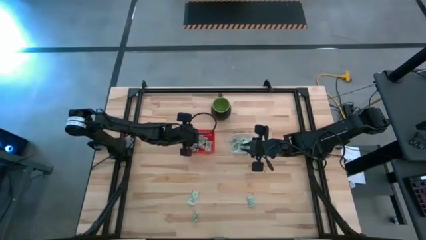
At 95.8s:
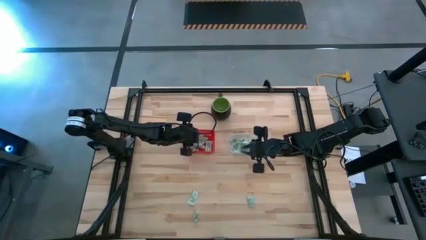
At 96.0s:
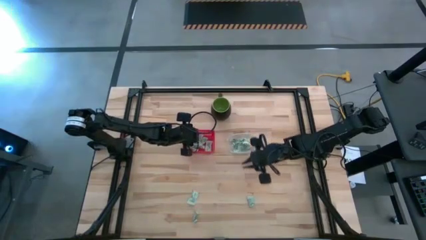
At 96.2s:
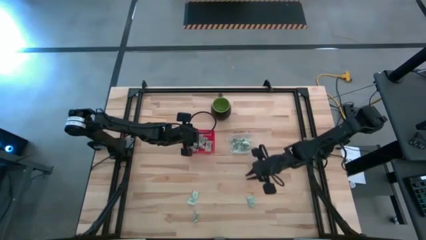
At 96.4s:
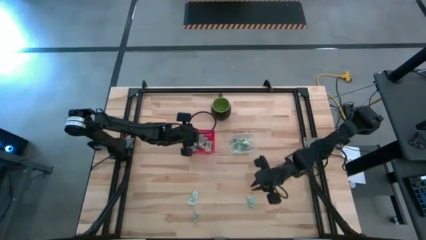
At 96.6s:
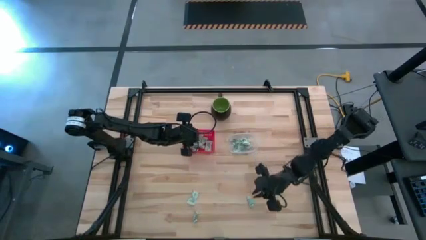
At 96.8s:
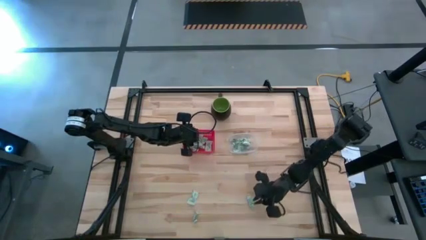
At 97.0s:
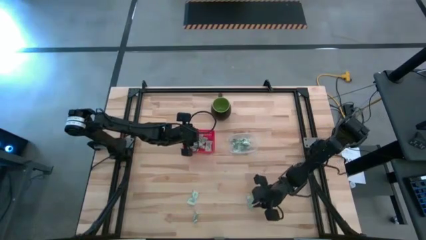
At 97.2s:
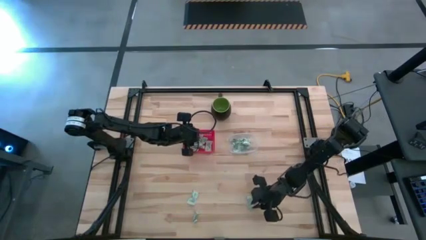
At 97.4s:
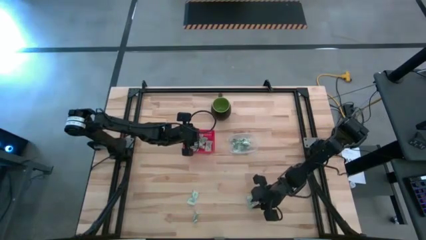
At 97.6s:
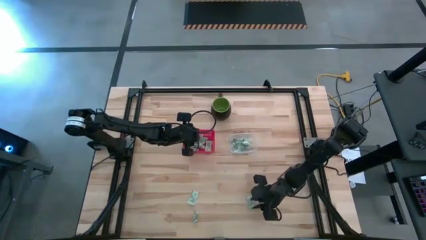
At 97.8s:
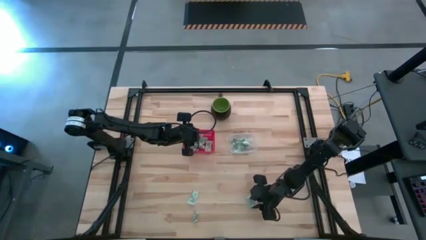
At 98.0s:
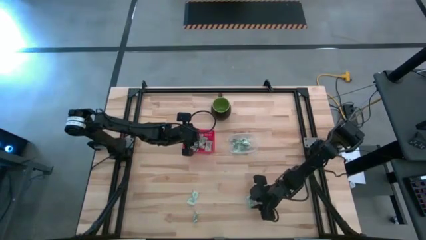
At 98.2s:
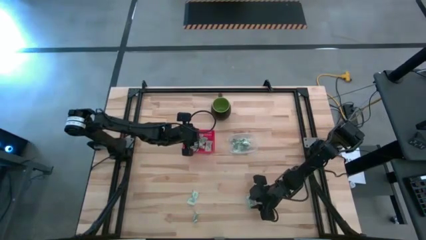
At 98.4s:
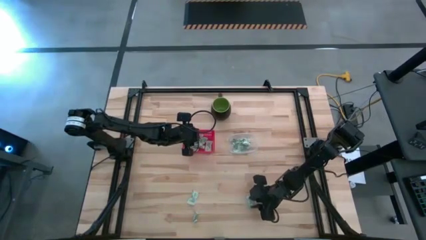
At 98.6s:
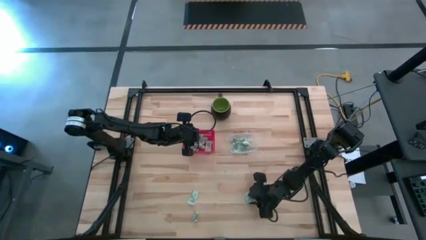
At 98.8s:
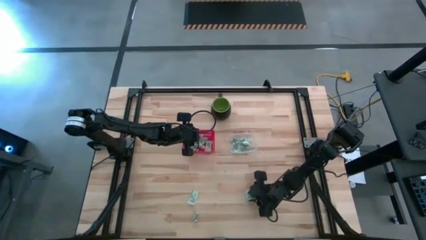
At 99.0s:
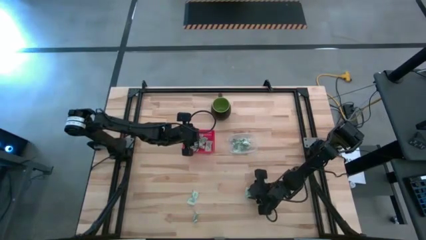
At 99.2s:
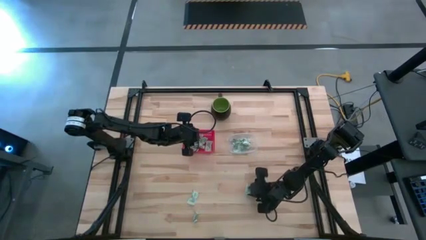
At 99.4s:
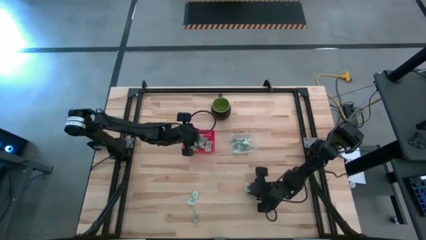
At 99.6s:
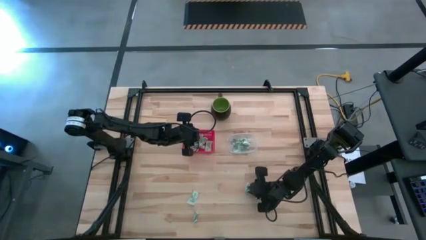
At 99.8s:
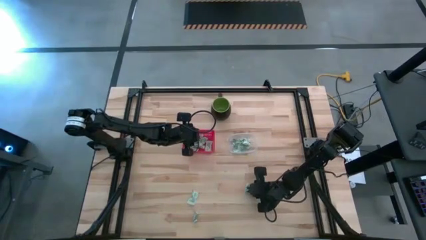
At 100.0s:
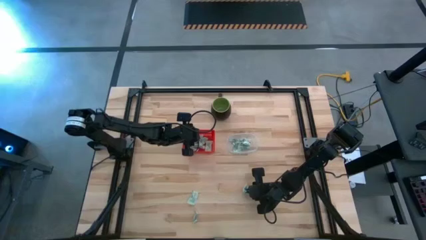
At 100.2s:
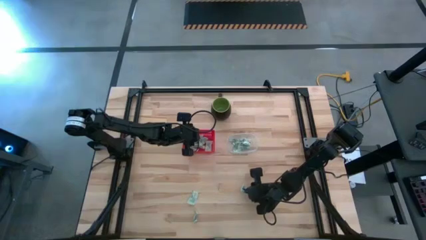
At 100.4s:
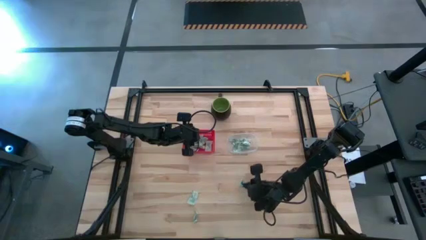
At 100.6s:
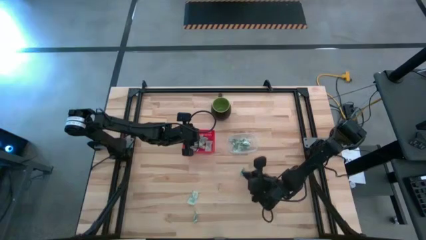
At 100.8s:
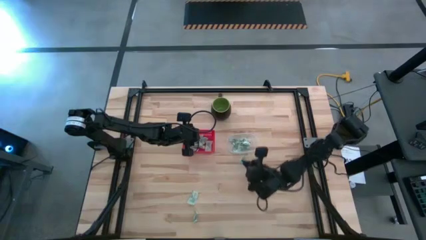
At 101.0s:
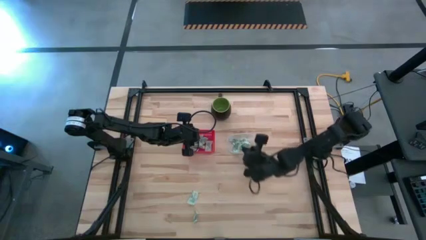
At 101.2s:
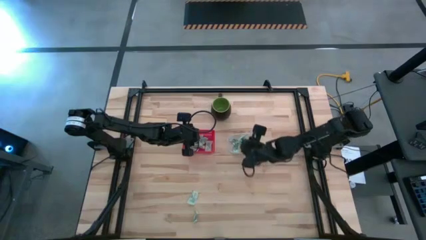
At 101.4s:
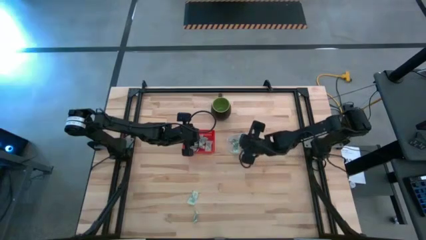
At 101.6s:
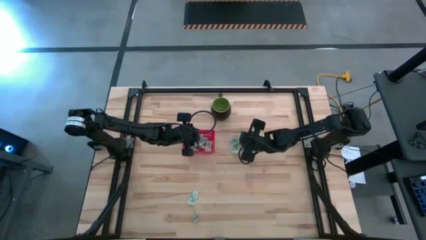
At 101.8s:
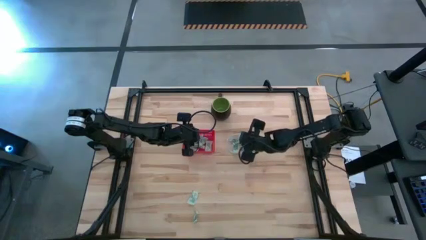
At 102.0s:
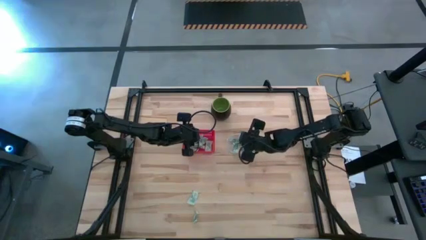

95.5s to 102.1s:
Task: Pick and place items into bin
Put the stevia packet into the transparent bin

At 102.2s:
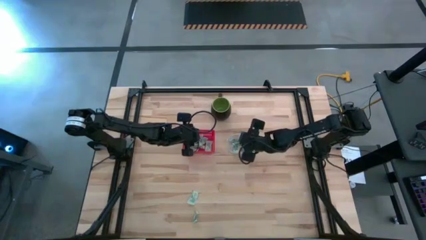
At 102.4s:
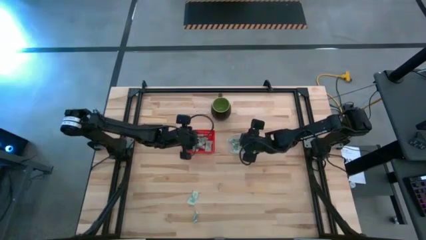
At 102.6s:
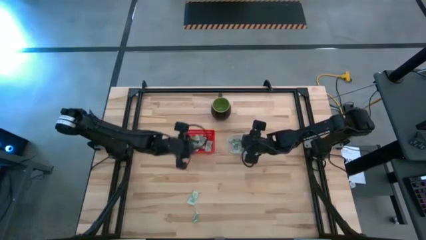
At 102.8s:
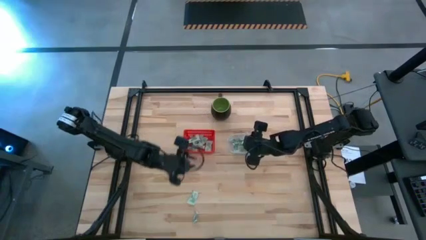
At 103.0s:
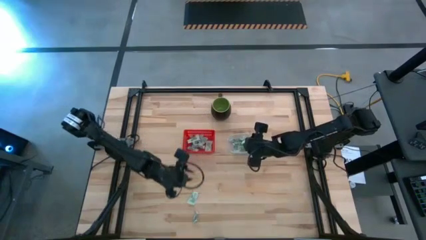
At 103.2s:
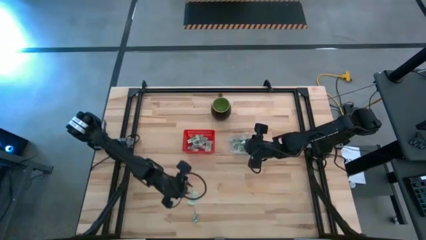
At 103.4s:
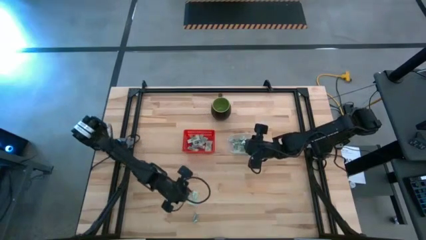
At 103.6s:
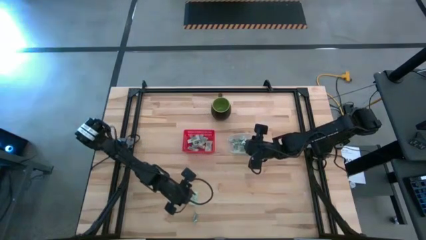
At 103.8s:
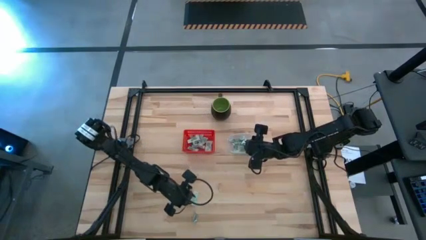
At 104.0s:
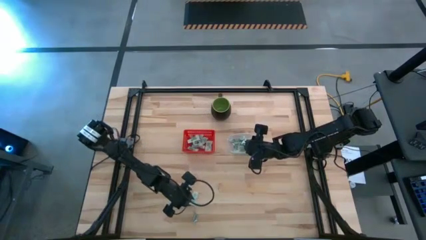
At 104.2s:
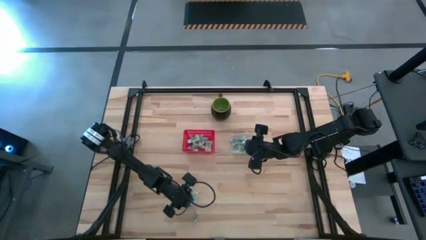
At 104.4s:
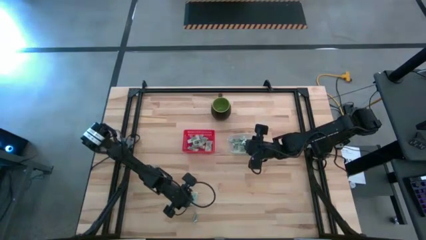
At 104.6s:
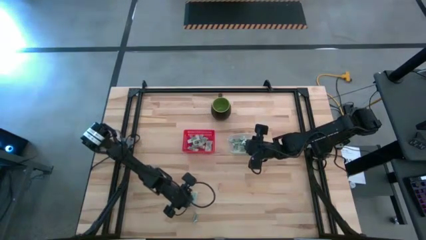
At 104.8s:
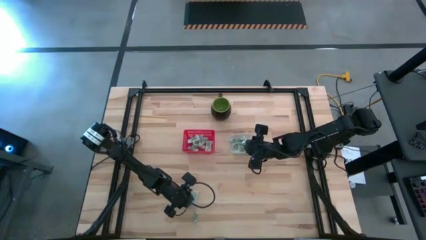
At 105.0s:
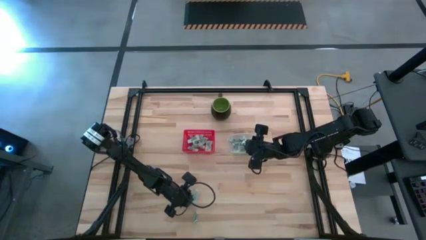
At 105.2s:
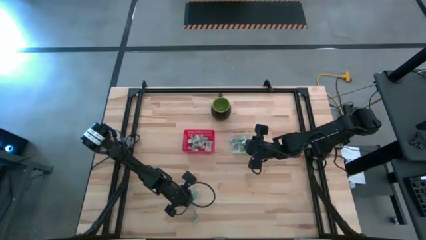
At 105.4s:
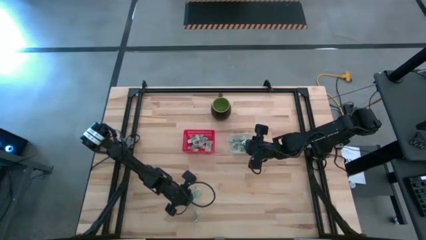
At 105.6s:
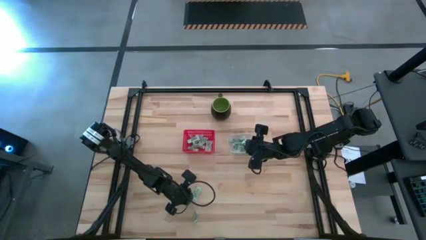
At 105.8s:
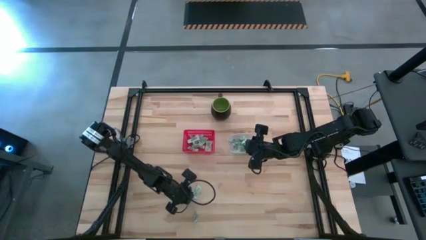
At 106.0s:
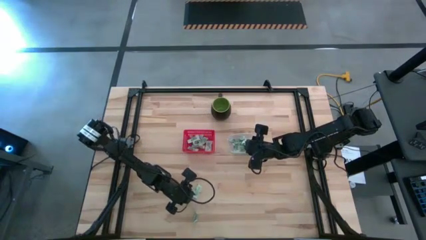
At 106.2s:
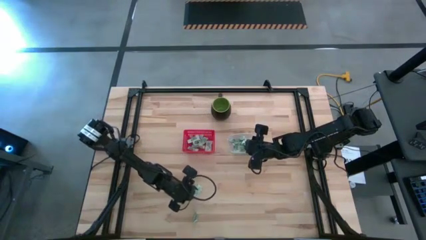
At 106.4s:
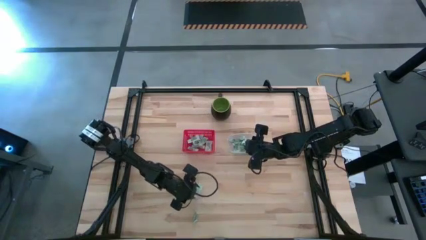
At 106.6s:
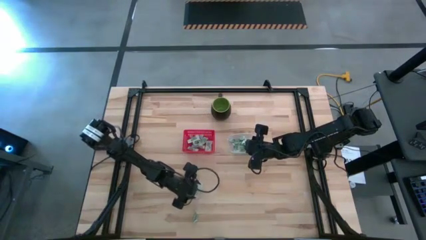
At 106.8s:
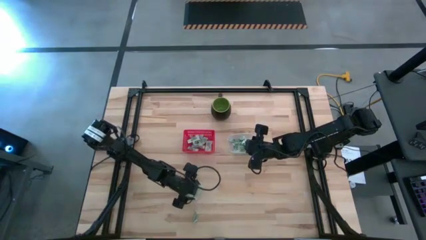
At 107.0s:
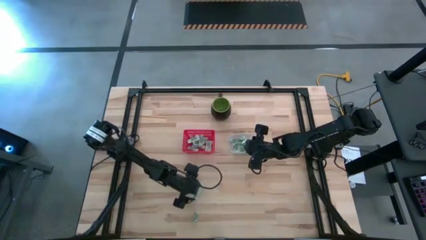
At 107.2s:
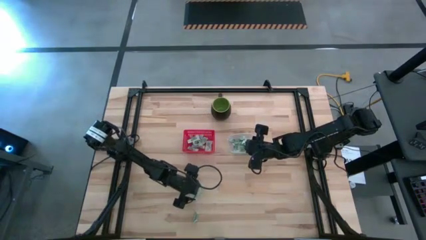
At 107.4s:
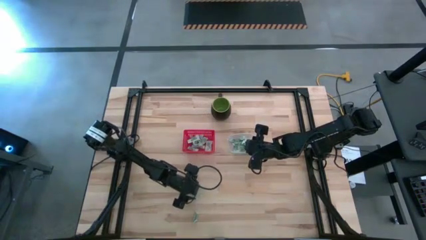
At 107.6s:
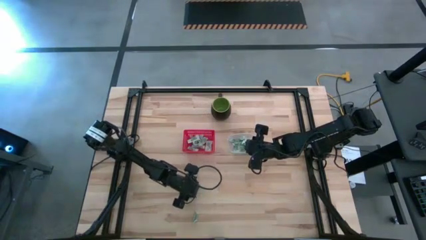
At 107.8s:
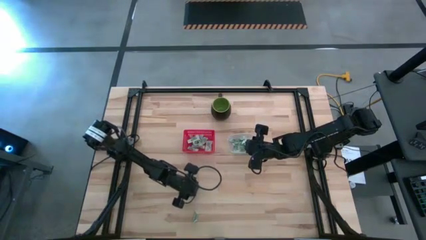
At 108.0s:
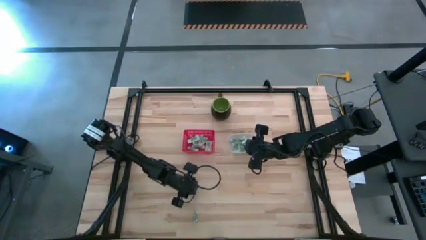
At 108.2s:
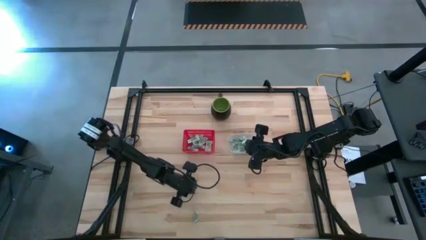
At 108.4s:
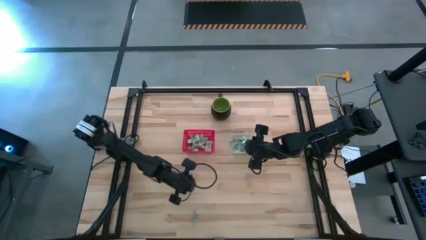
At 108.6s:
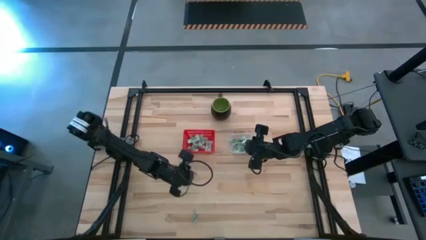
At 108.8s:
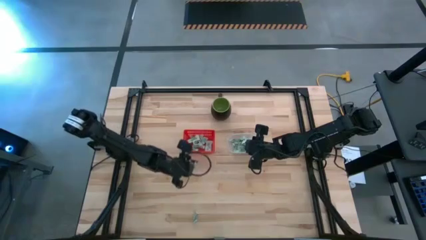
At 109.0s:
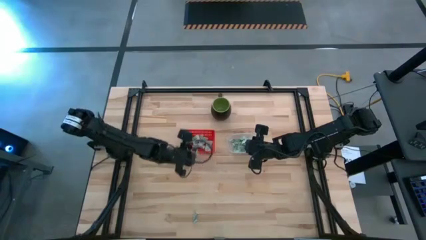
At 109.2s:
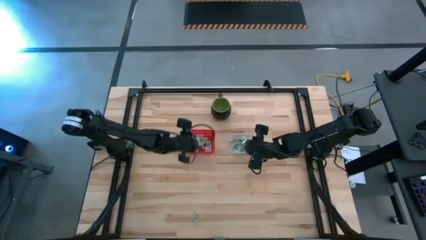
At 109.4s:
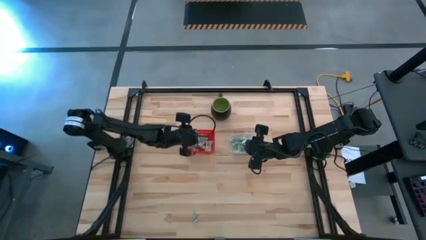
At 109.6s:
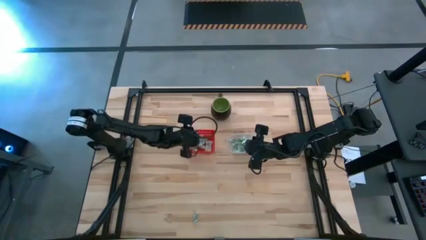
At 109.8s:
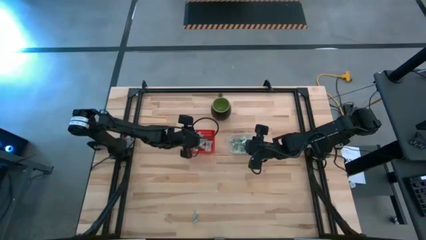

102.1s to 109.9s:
Put the stevia packet into the red bin

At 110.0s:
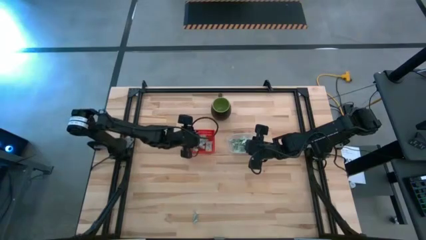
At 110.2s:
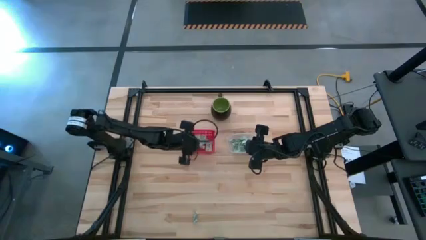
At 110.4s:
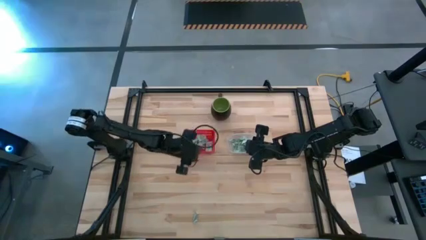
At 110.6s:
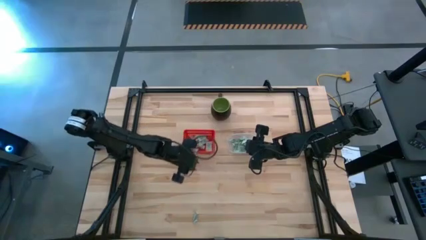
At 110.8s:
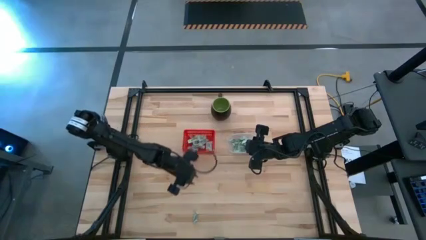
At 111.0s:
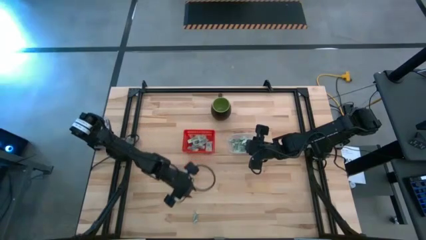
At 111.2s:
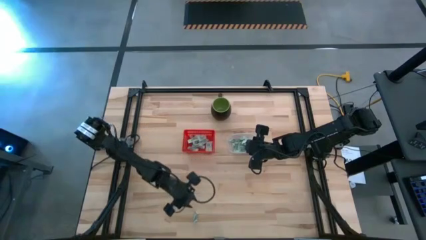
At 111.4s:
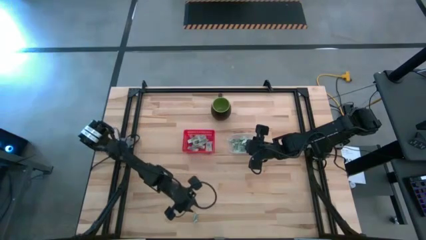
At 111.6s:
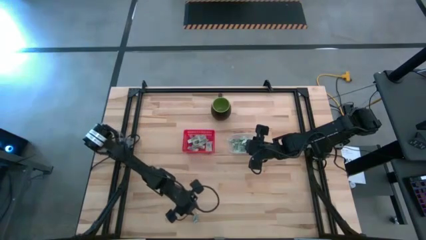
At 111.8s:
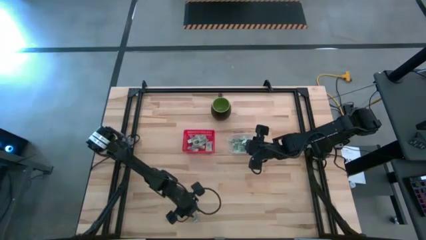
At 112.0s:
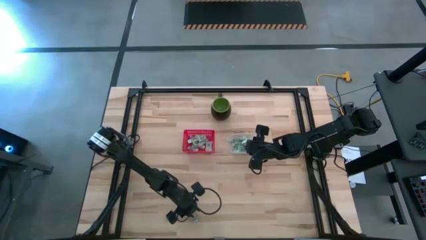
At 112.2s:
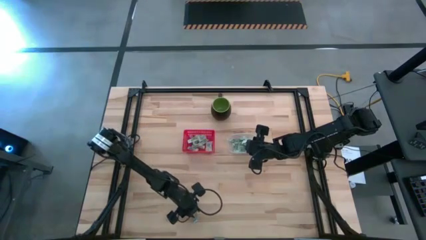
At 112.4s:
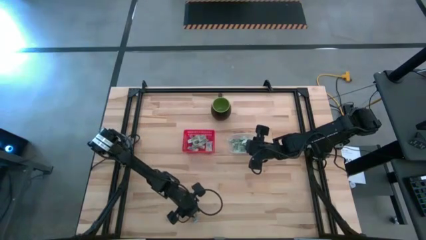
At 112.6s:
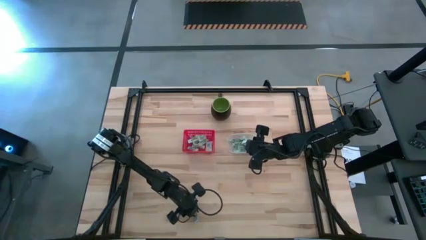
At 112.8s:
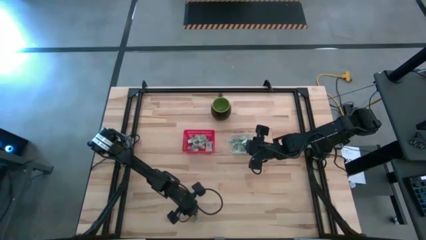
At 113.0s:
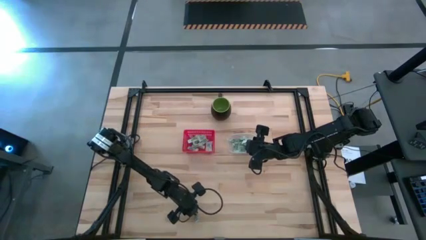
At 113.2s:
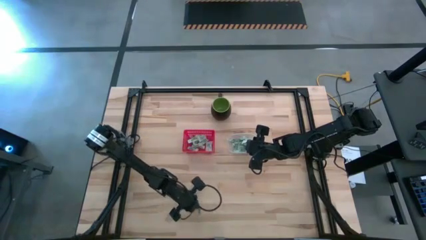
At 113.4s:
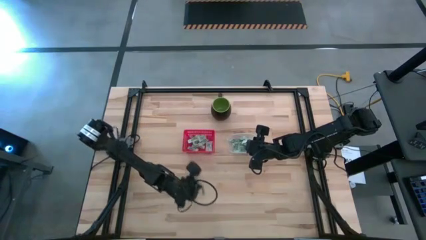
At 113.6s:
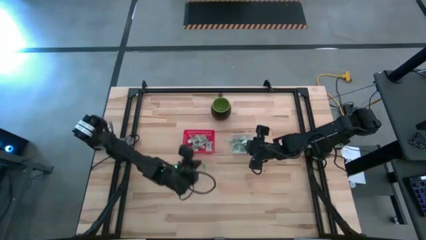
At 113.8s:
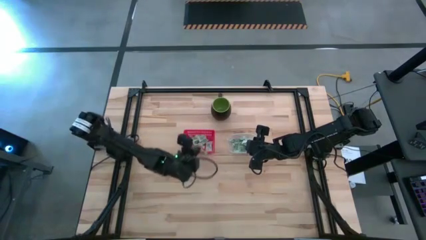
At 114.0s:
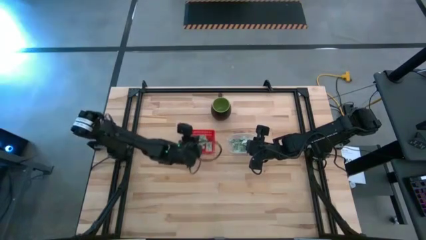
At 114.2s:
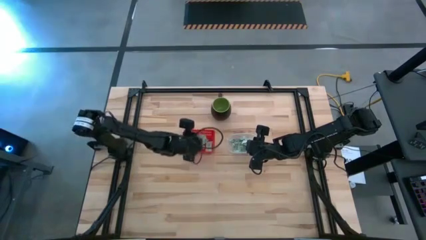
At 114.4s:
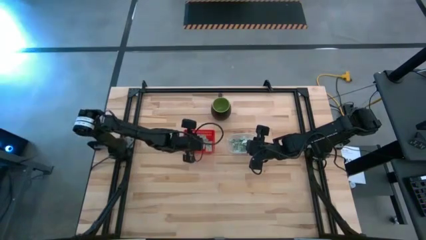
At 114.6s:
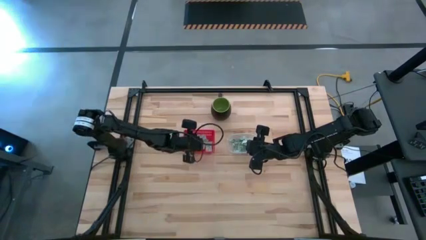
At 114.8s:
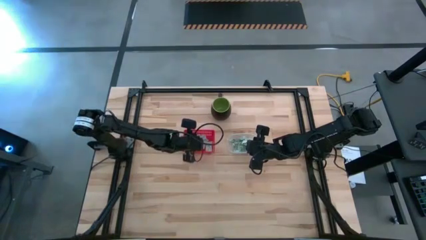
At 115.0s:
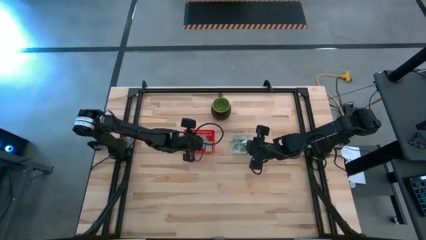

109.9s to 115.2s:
Put the stevia packet into the red bin
